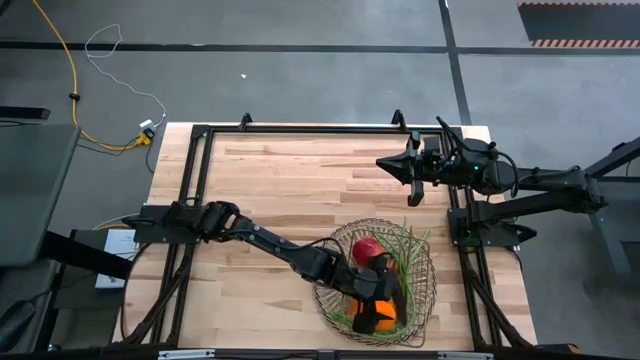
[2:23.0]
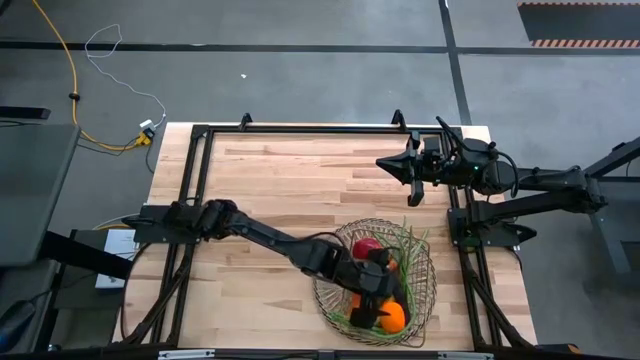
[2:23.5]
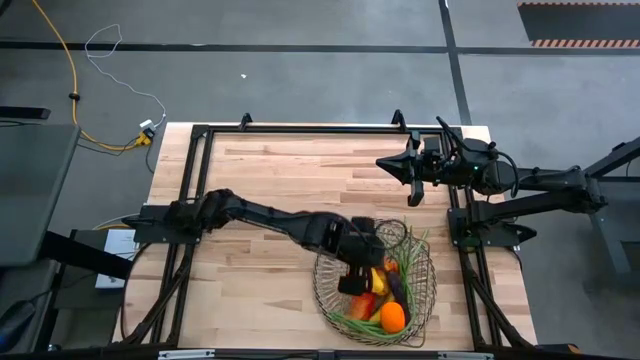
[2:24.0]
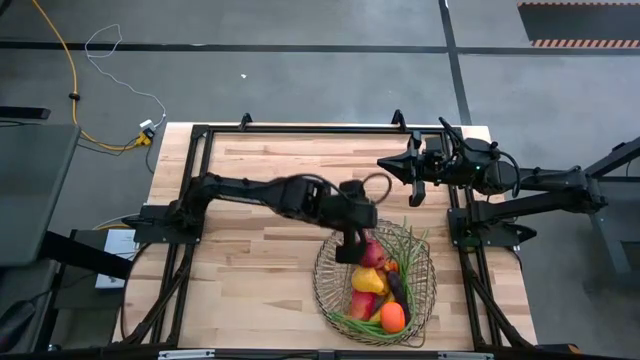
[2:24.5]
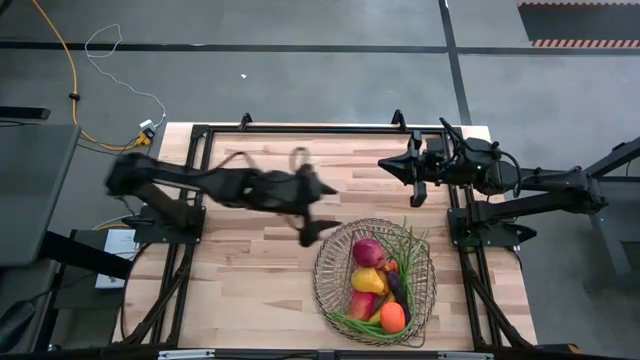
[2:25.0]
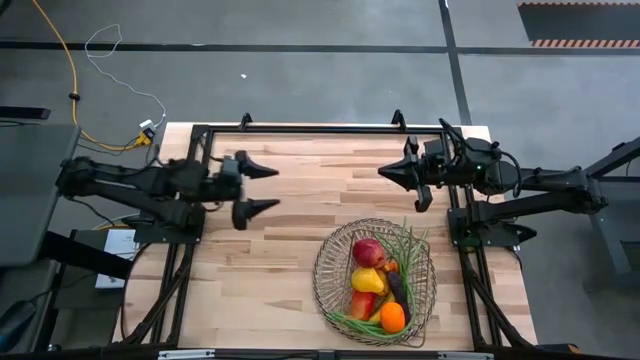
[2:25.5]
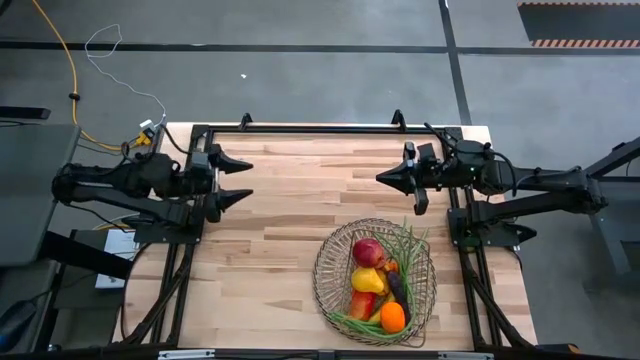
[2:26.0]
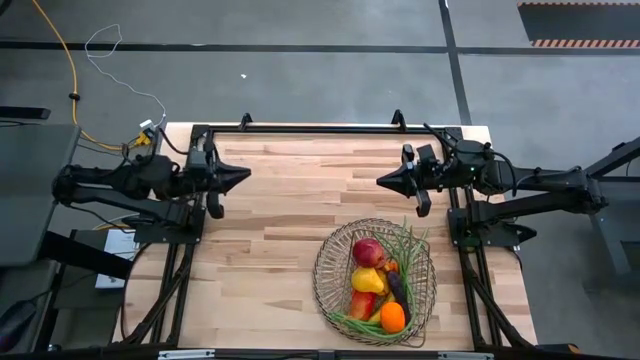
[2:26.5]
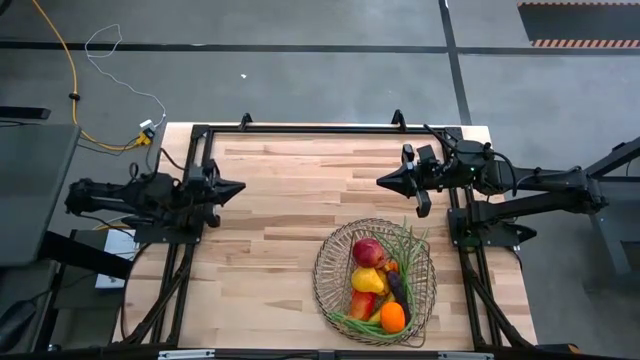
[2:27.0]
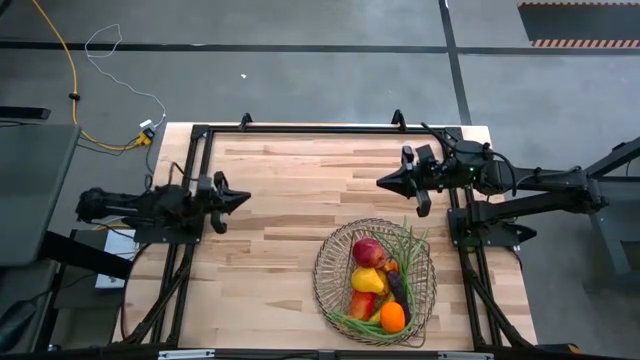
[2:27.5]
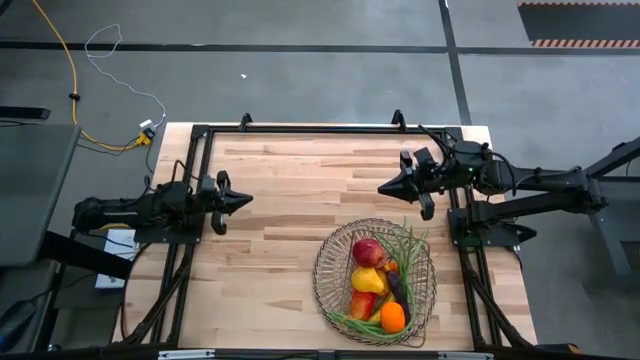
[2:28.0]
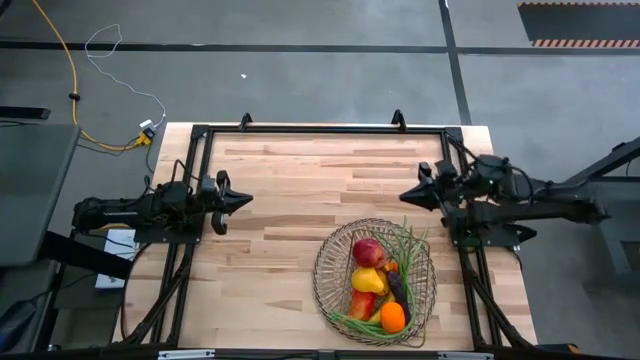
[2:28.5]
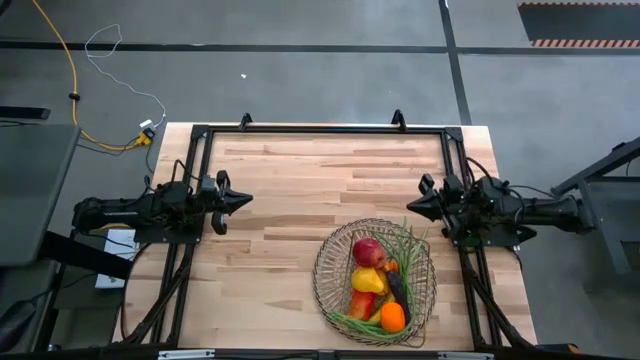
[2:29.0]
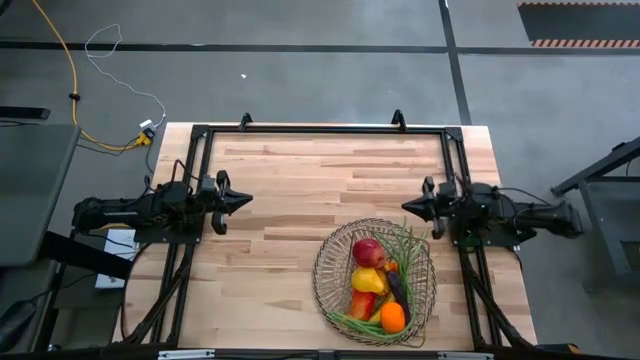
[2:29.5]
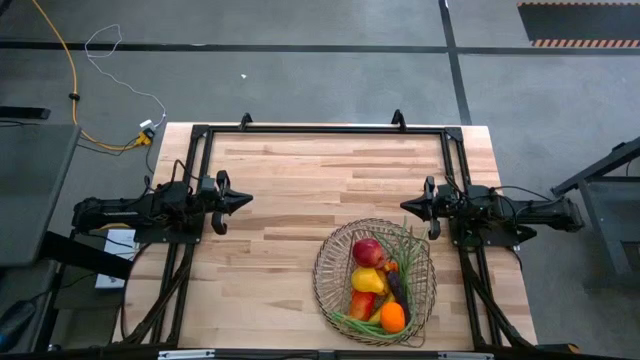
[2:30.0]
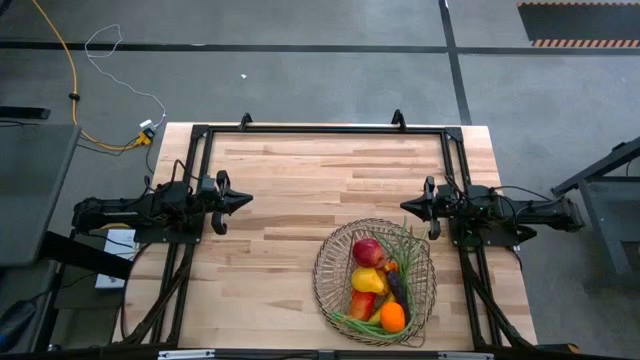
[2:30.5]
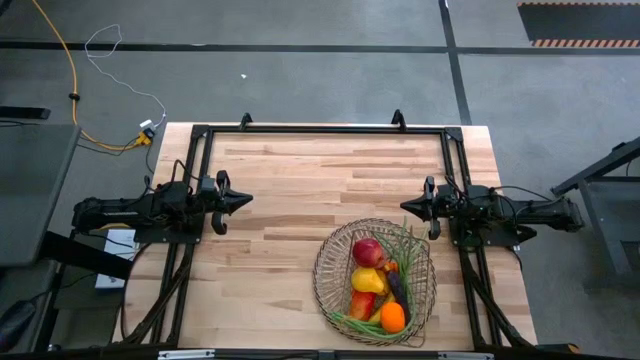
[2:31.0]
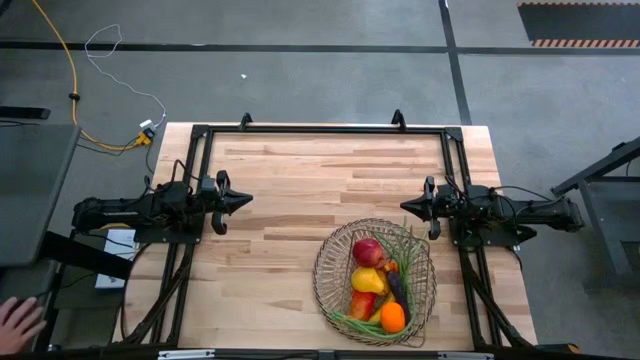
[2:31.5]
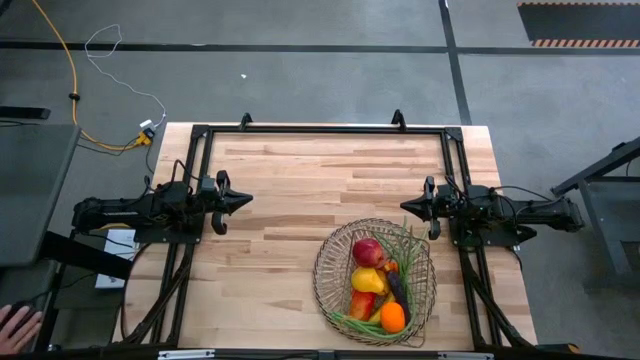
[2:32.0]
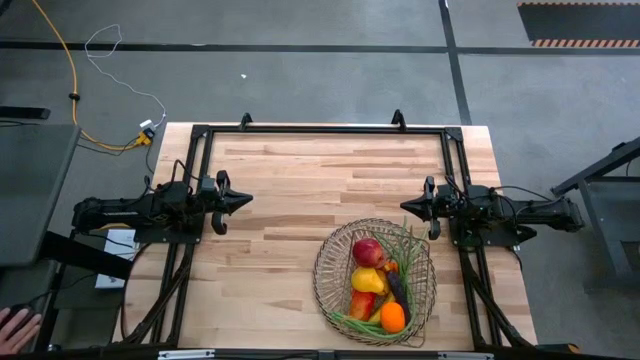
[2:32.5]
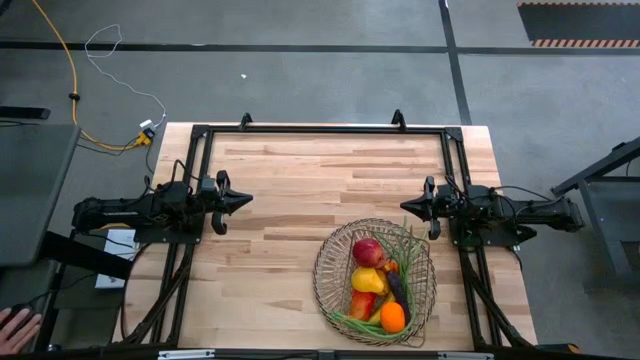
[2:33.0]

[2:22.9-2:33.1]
Task: Build produce basket
Return to Home Position

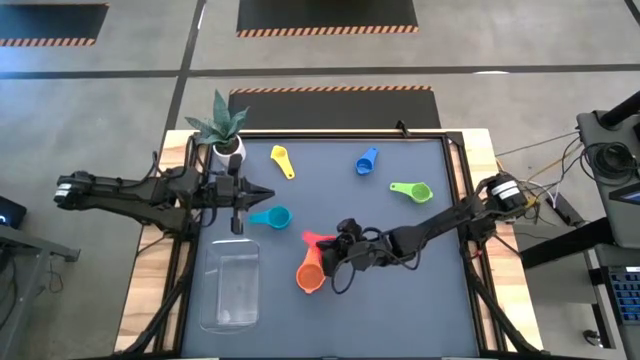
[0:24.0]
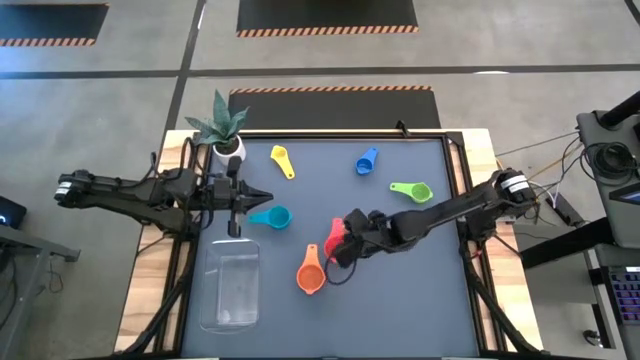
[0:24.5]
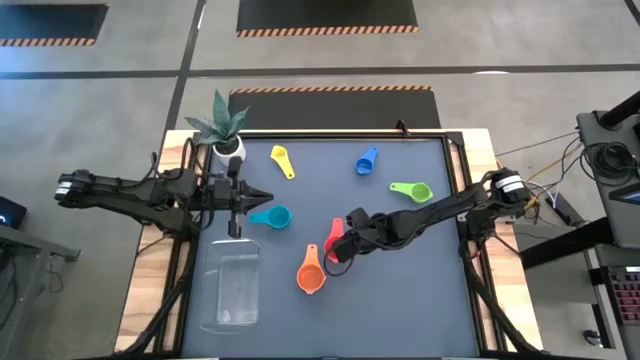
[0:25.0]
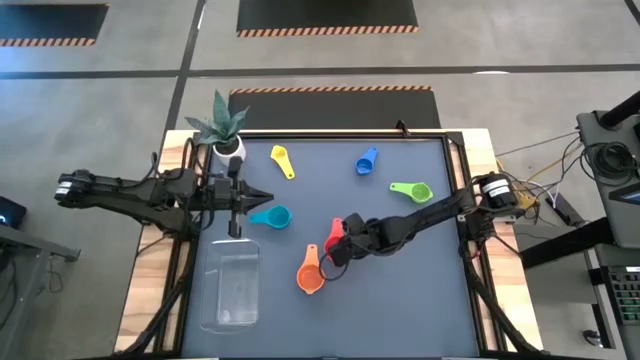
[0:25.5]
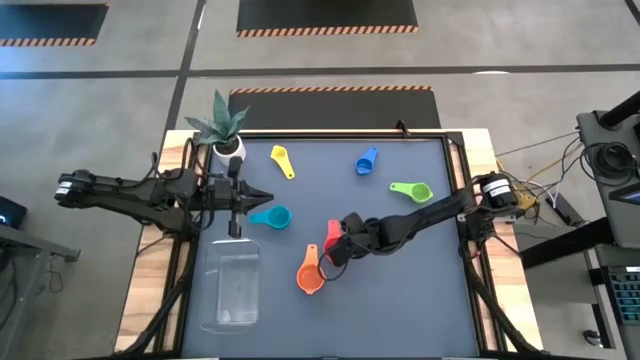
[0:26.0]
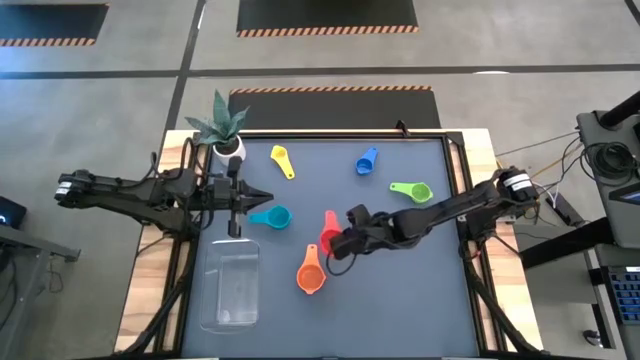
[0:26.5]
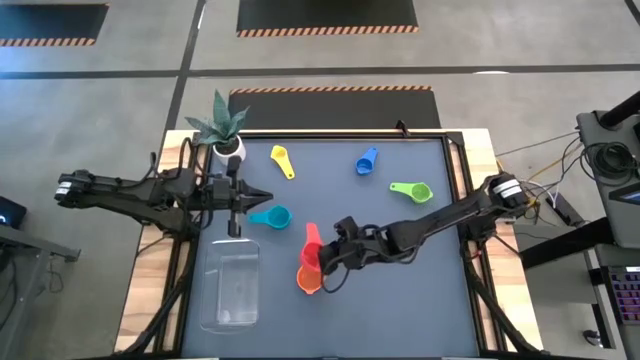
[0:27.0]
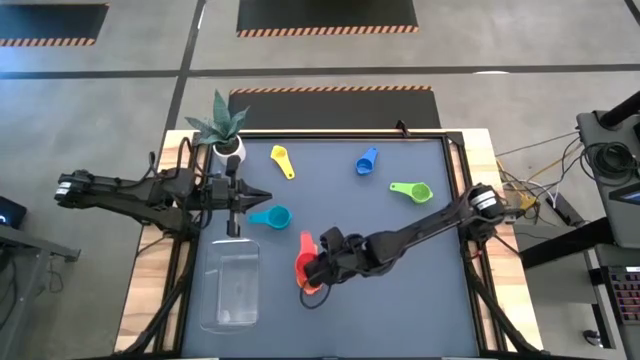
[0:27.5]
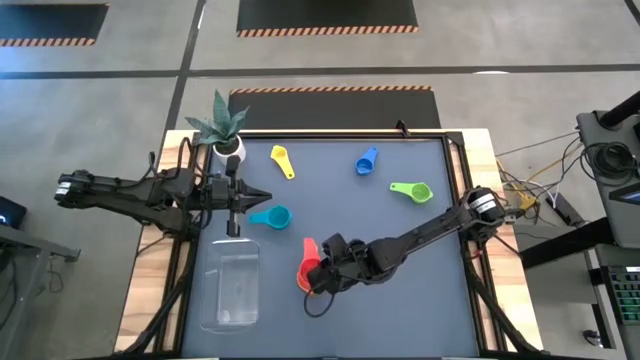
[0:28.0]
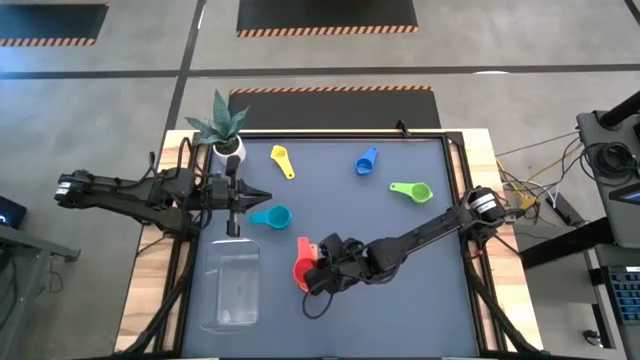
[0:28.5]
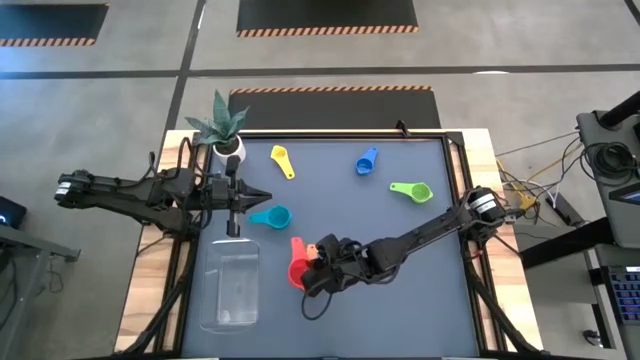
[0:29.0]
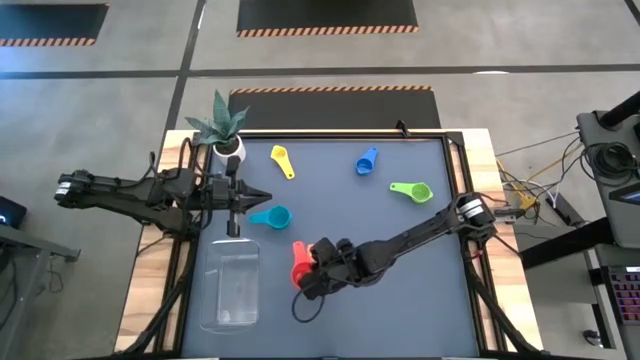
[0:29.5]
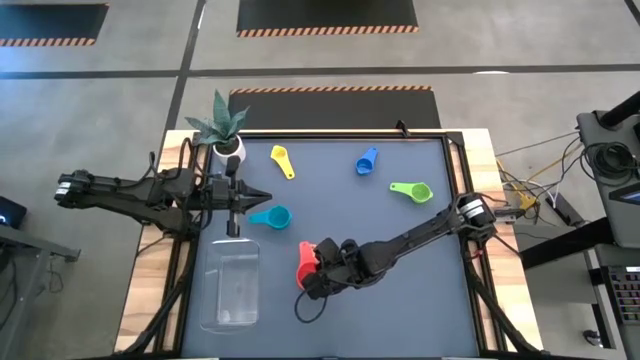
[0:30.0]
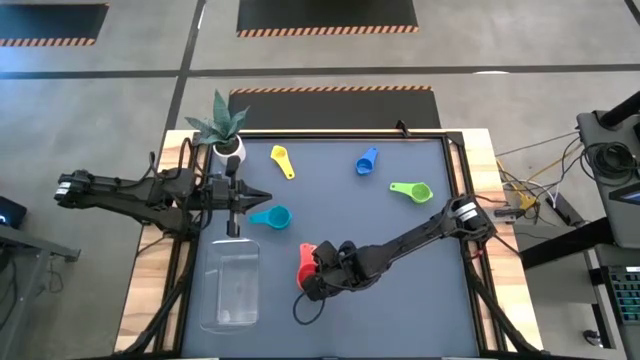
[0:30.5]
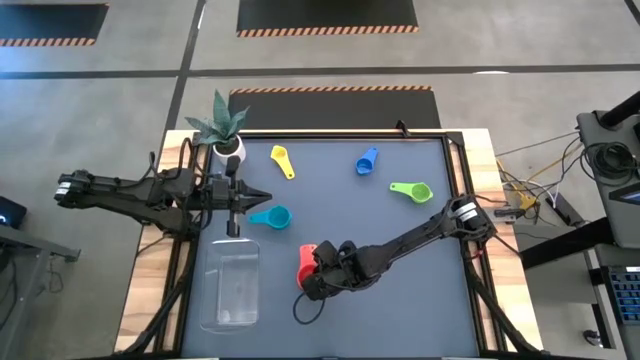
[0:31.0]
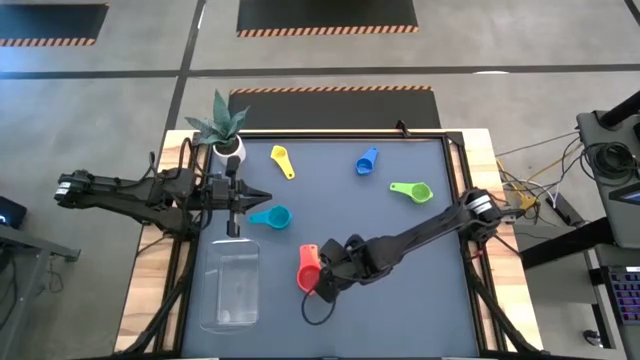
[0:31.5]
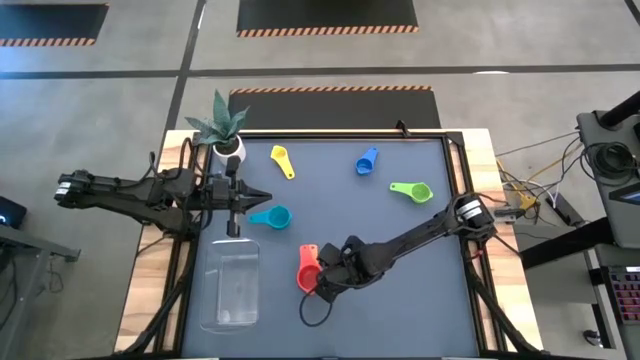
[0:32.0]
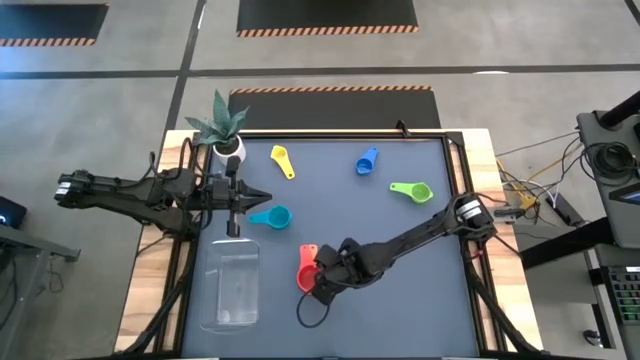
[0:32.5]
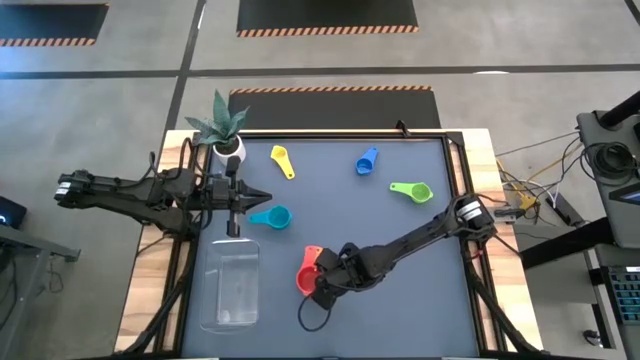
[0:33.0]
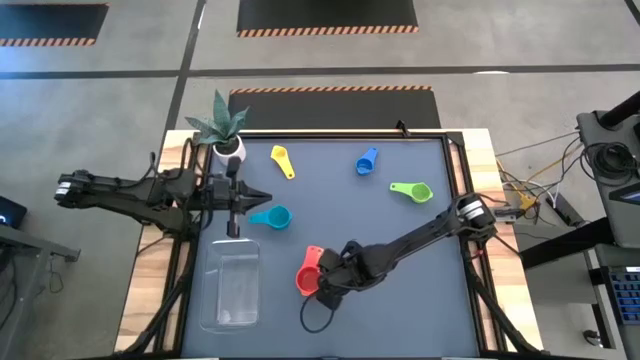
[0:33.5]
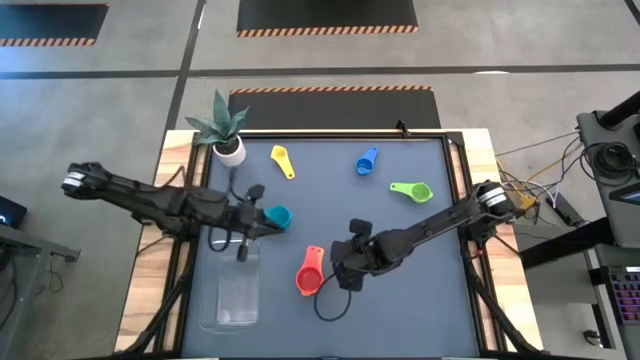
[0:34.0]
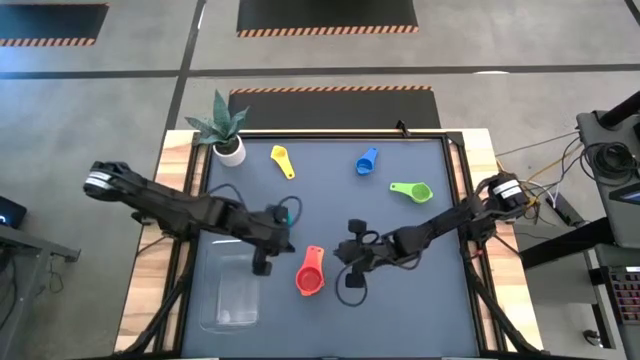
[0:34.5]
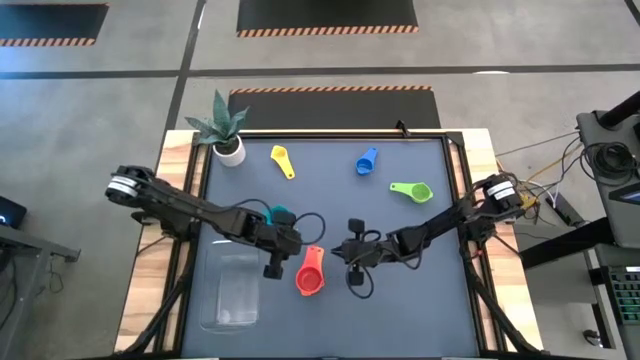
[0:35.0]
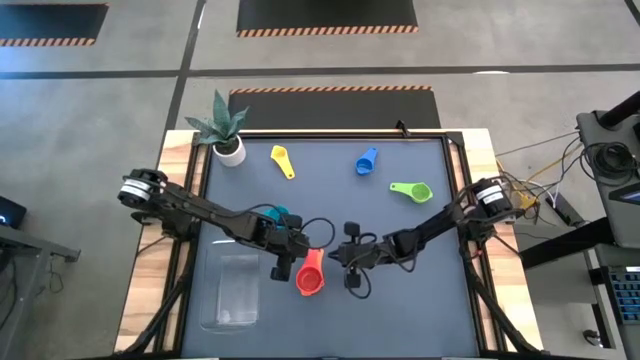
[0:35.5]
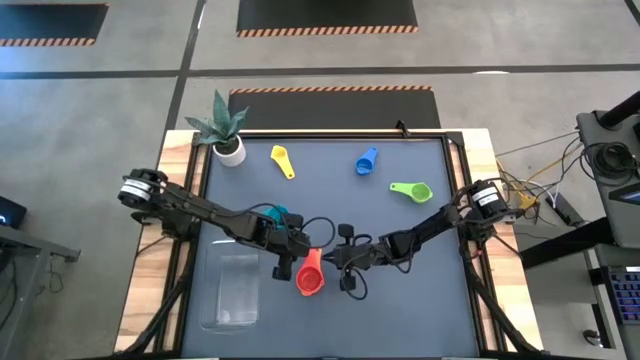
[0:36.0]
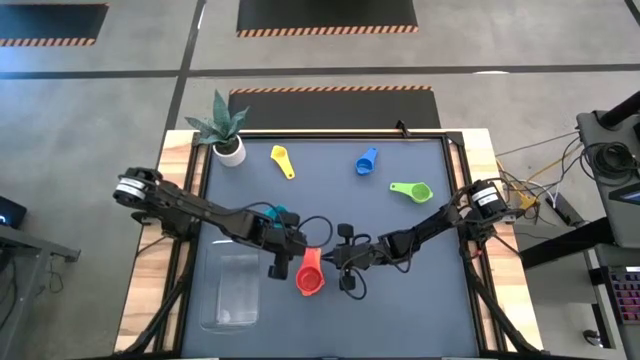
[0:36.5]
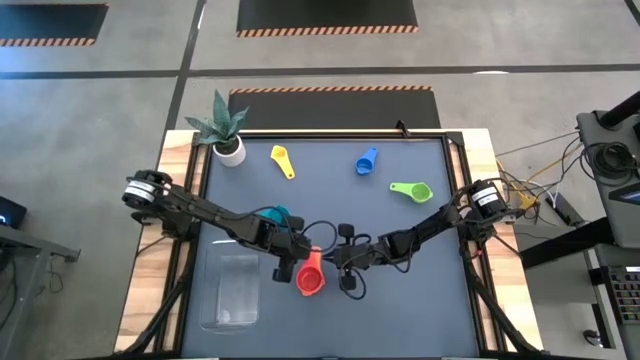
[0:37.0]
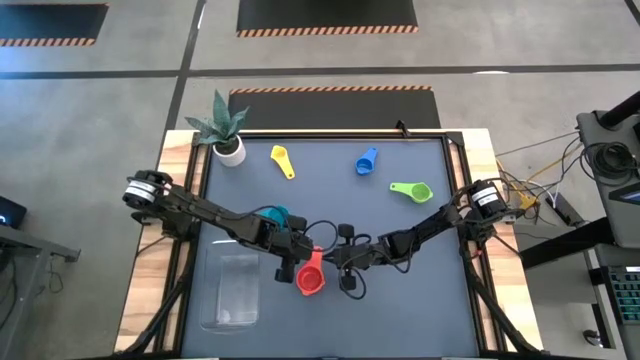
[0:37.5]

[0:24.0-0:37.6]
Task: Nest measuring cups in basket
Stack the red measuring cup on top of the orange cup
